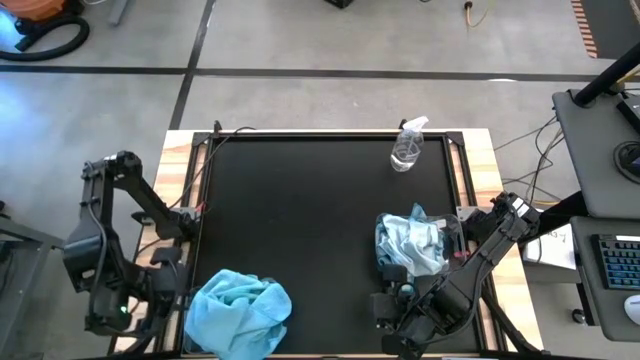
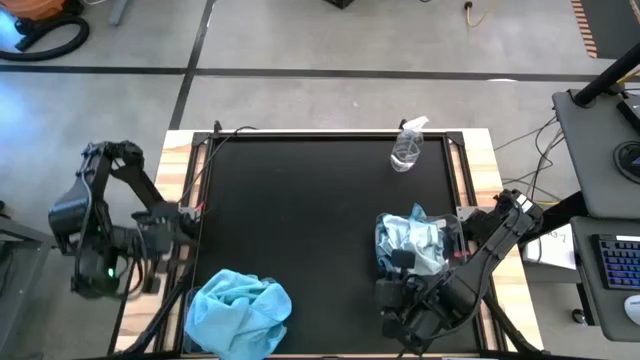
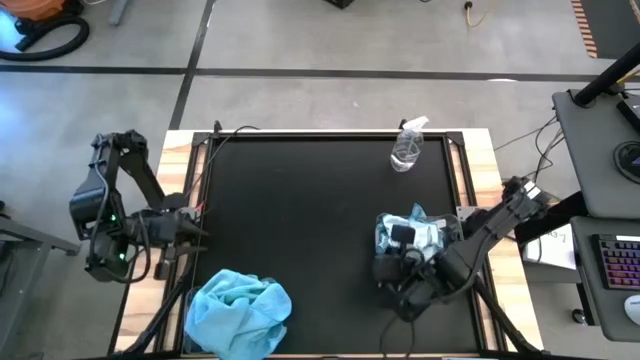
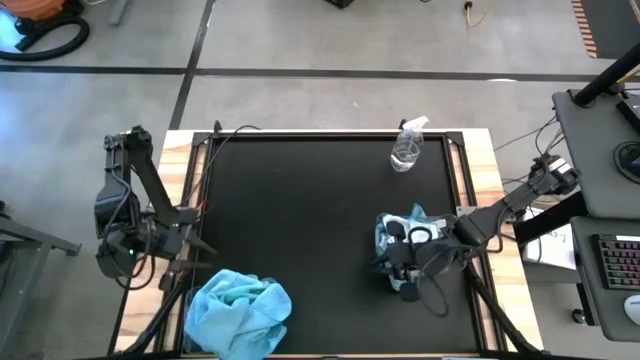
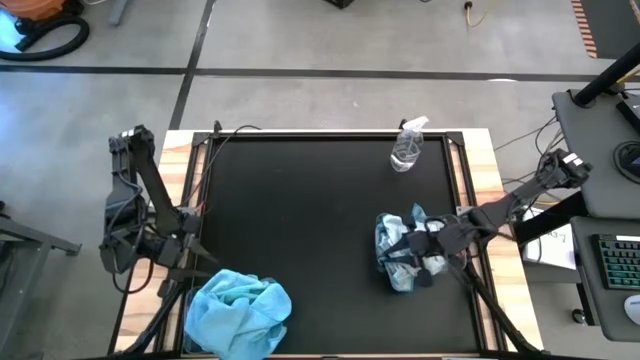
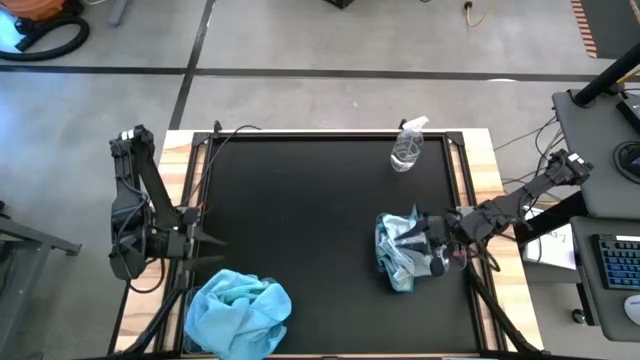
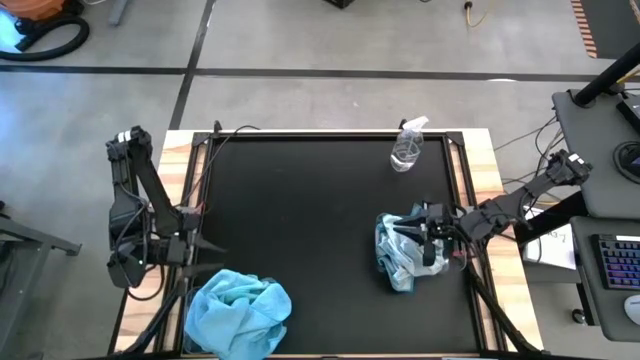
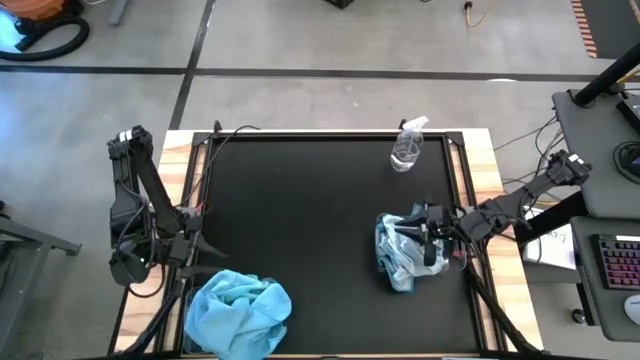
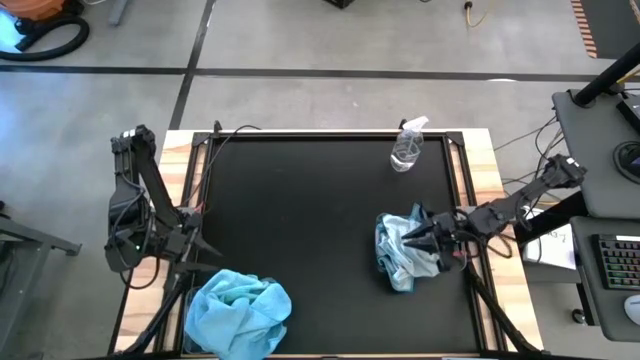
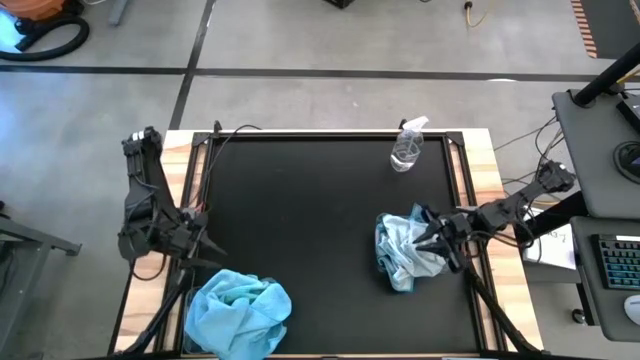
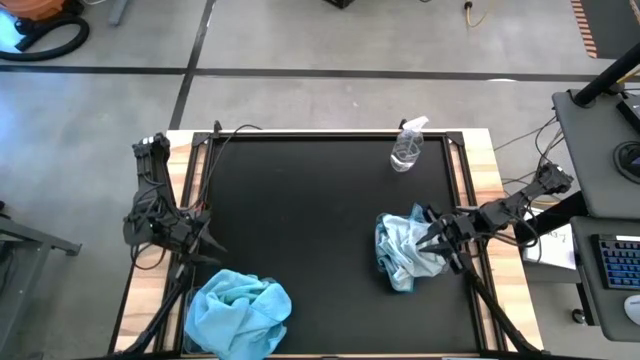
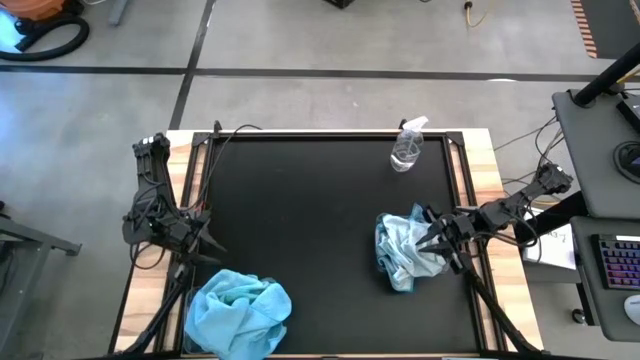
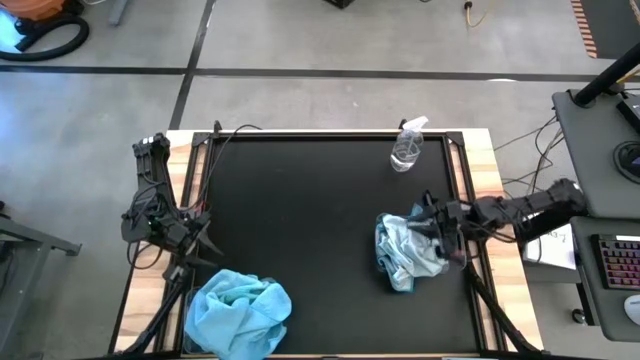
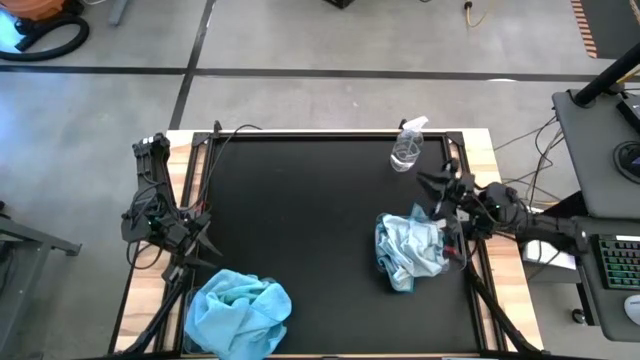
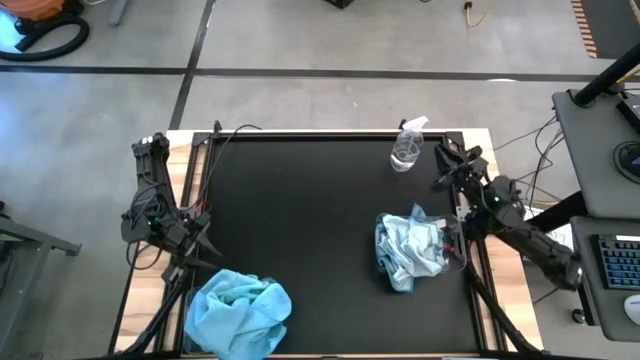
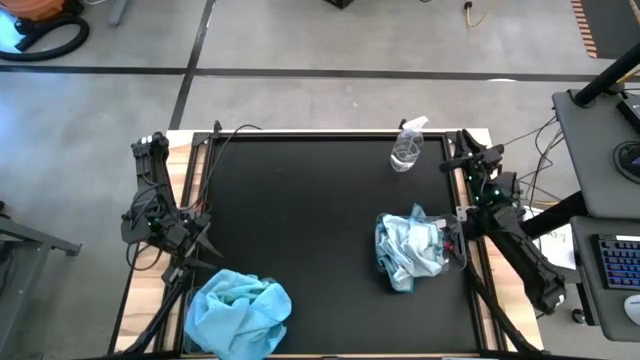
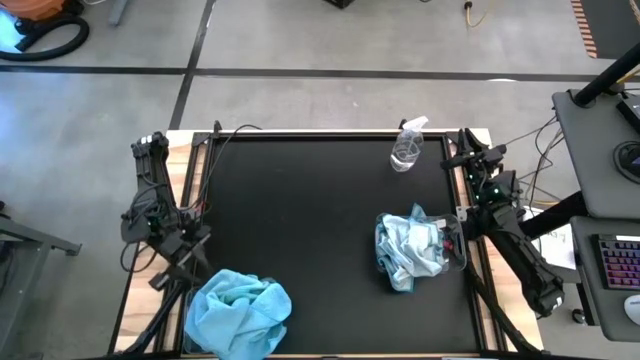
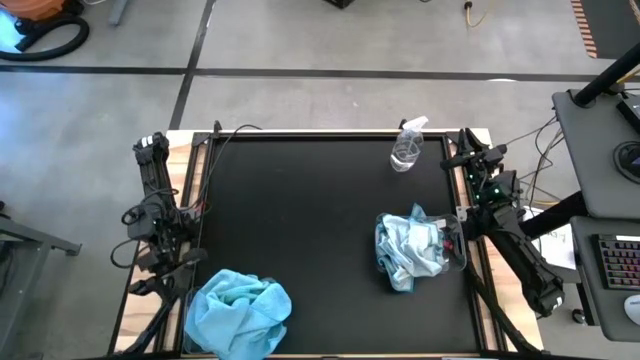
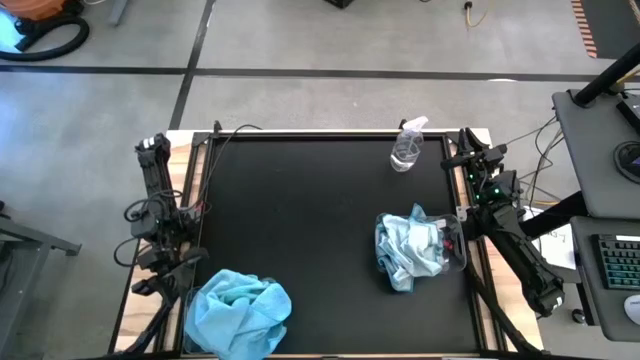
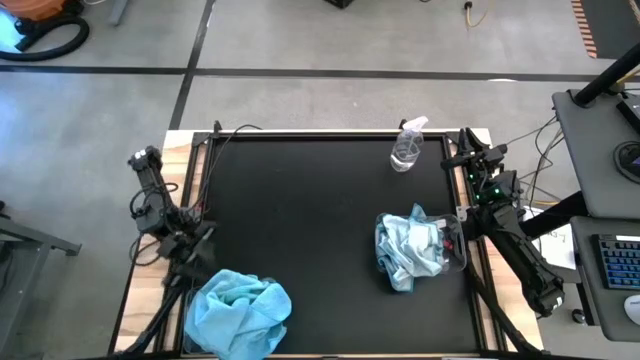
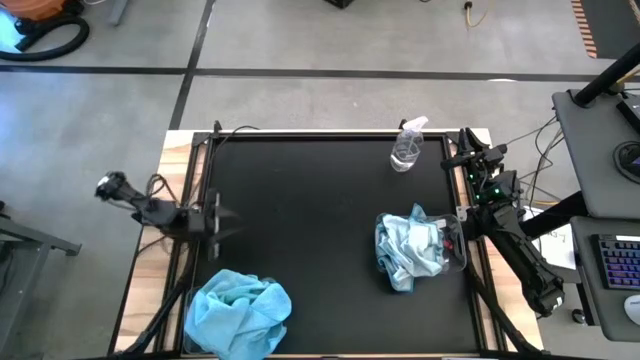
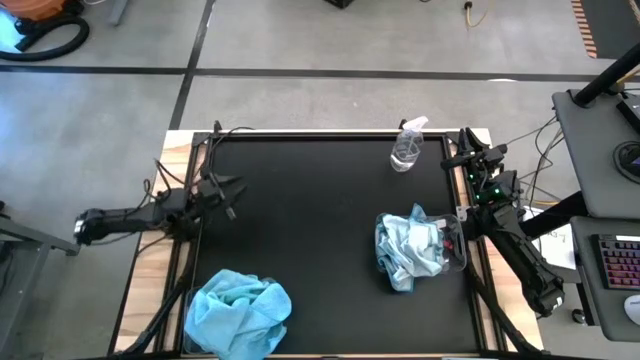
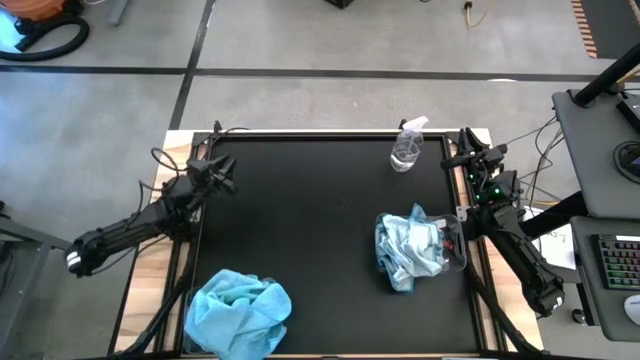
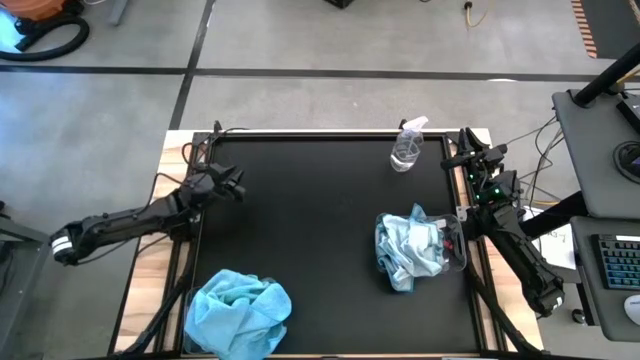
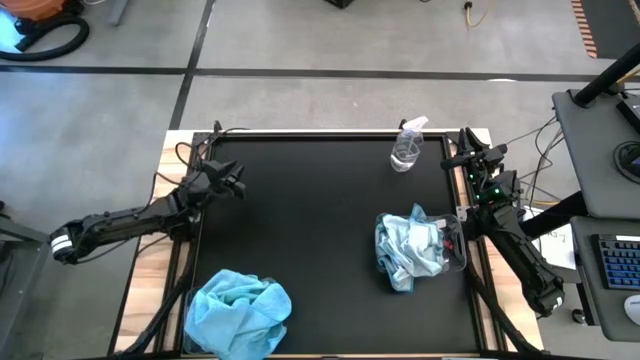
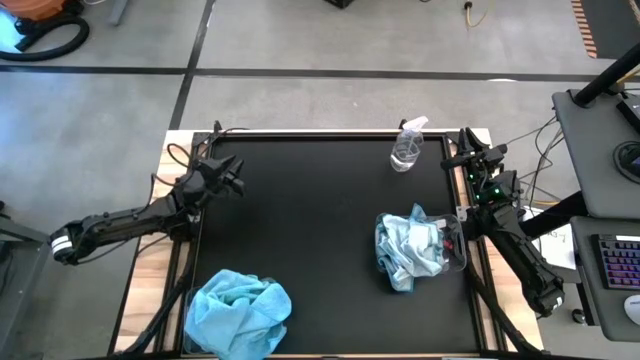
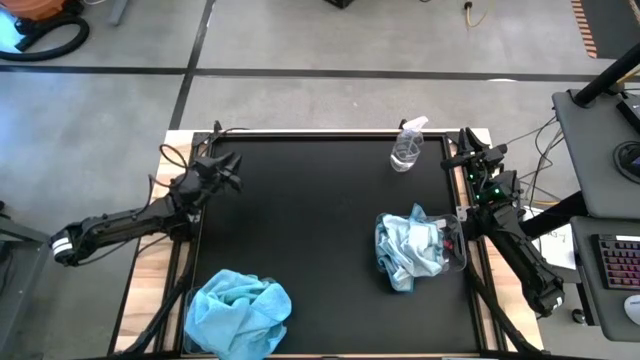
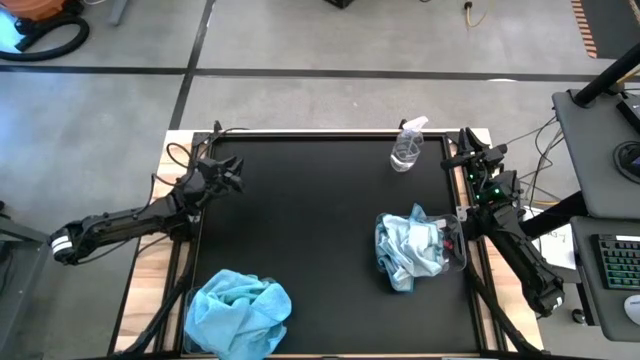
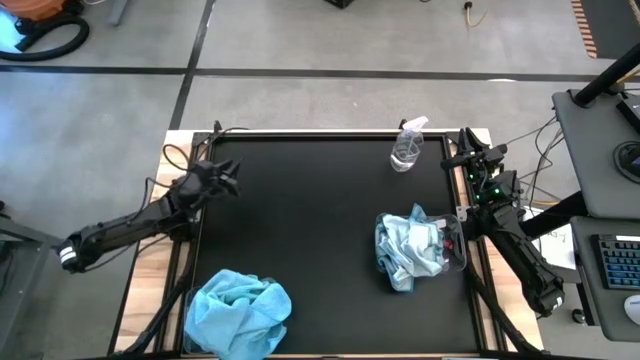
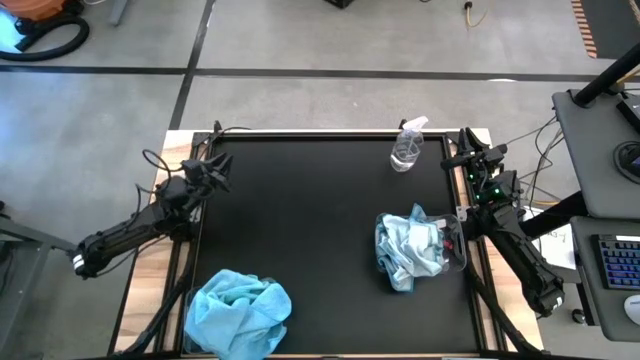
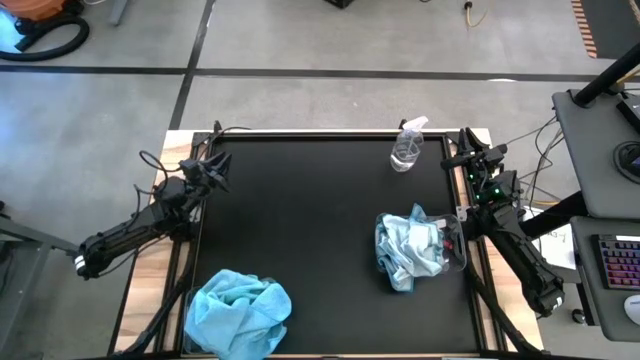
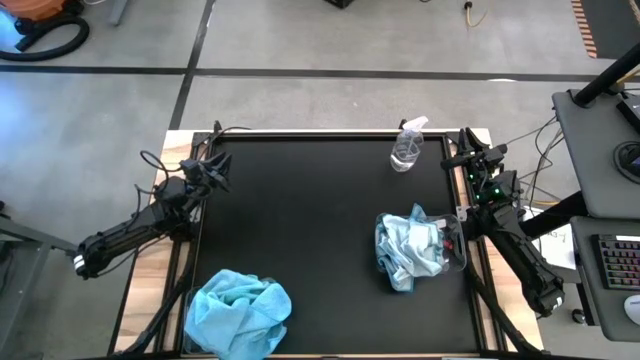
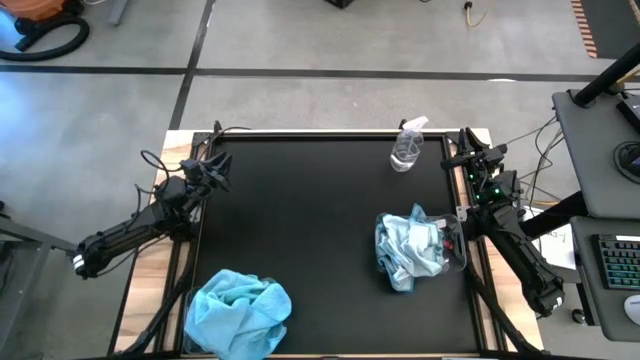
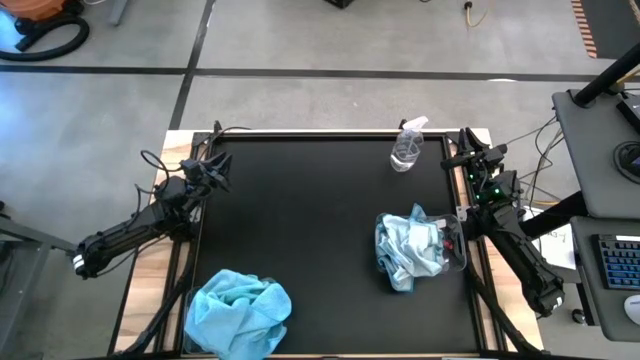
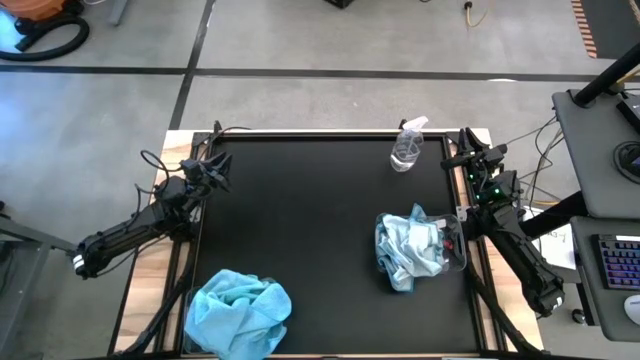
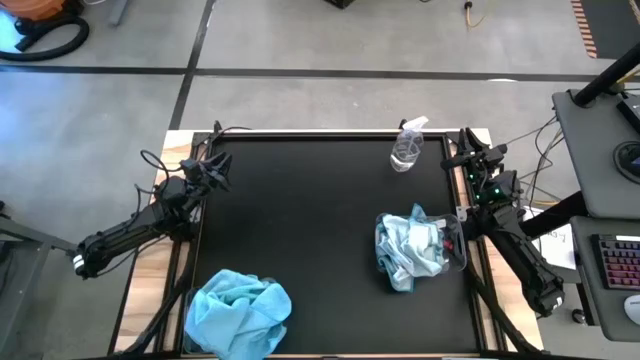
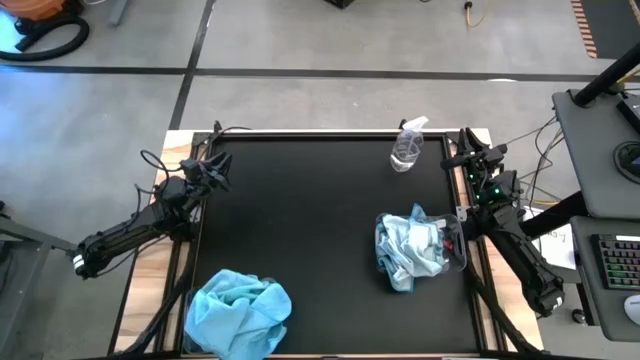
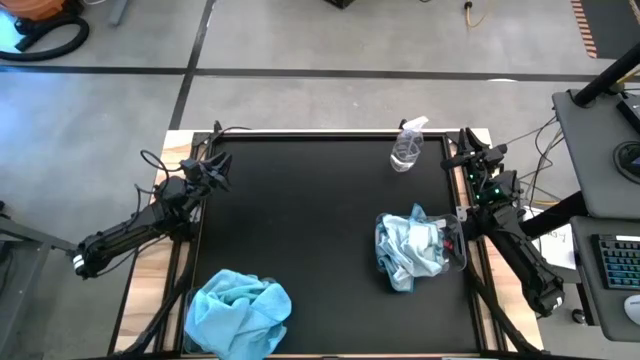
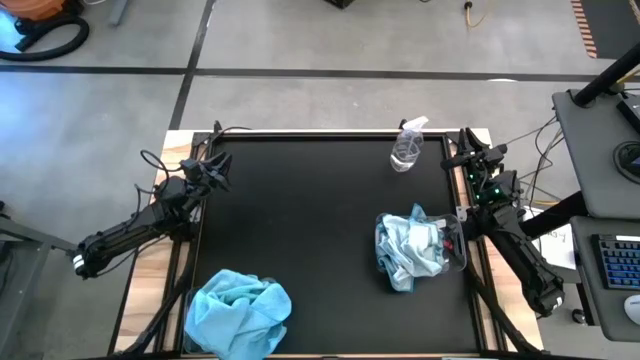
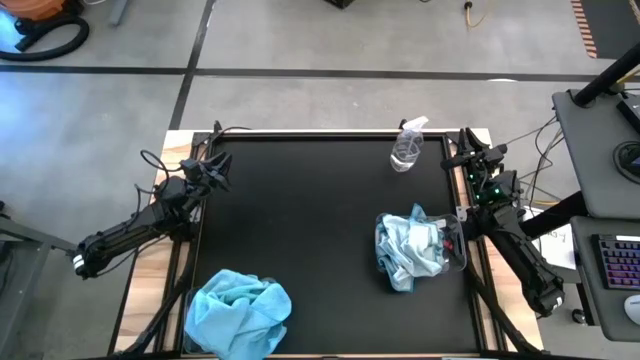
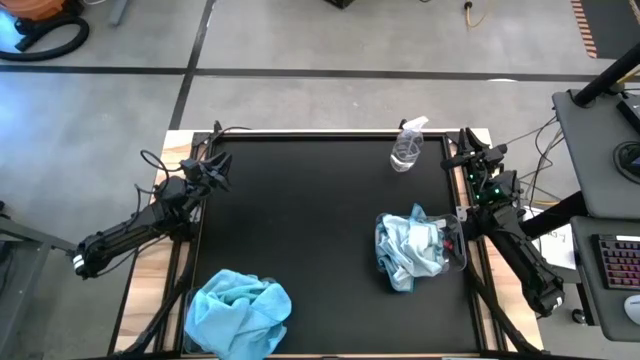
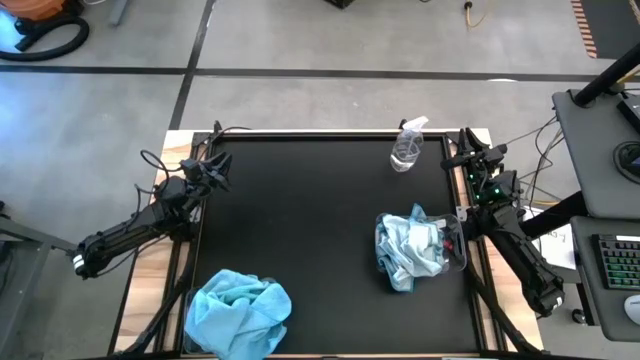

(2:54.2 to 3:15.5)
Task: Sort microfiber towel by color & place in baskets
Return to Home Position
